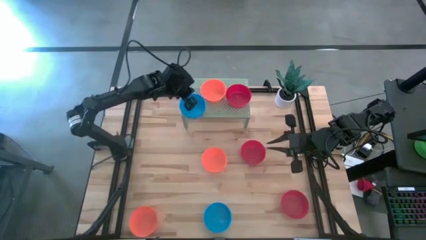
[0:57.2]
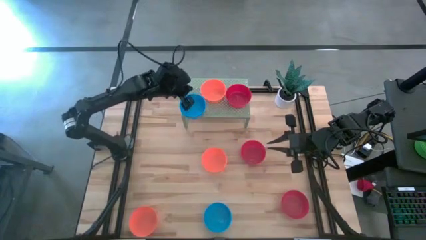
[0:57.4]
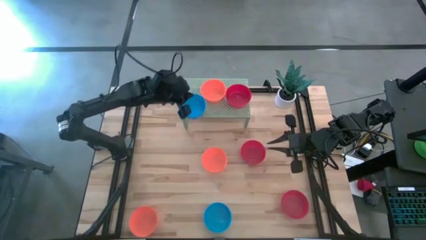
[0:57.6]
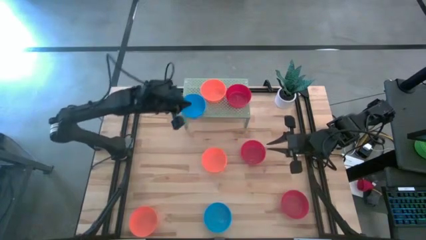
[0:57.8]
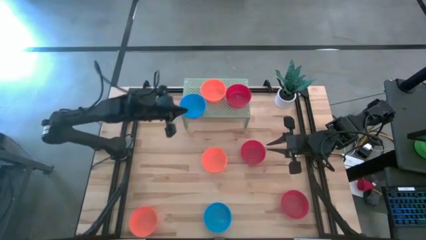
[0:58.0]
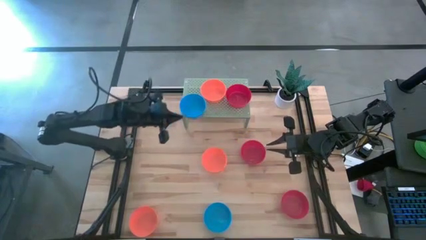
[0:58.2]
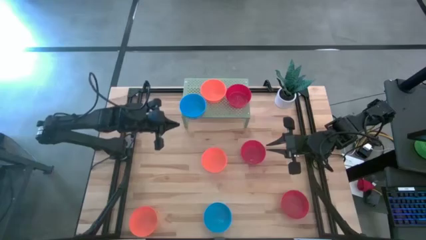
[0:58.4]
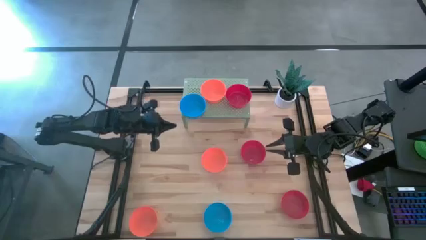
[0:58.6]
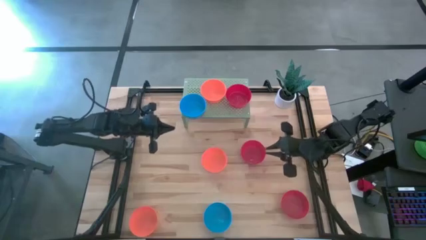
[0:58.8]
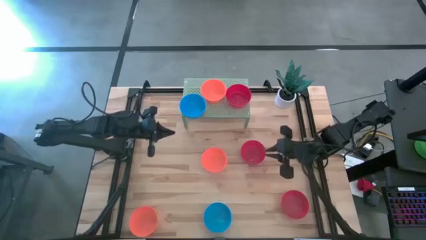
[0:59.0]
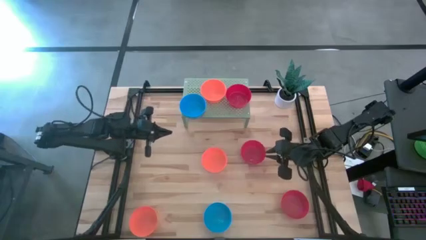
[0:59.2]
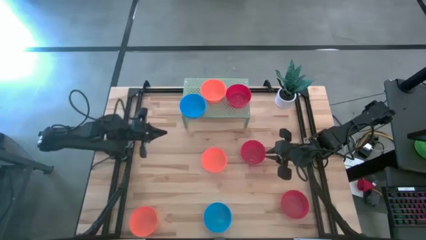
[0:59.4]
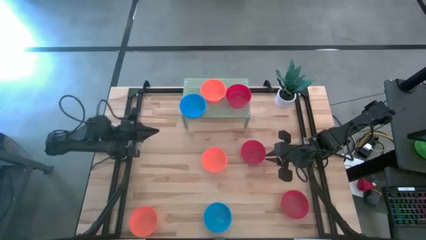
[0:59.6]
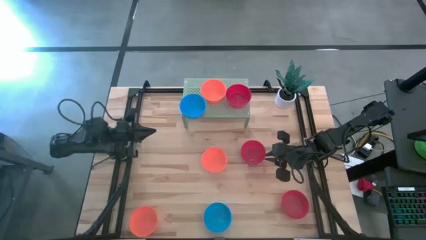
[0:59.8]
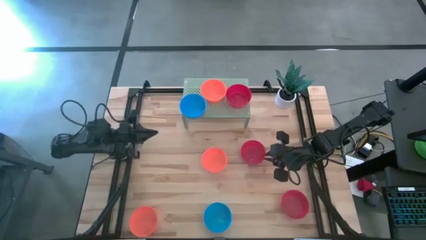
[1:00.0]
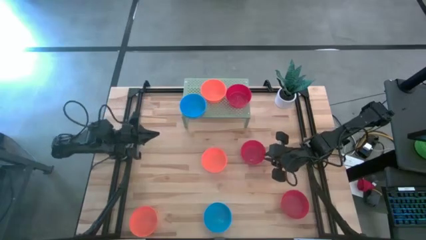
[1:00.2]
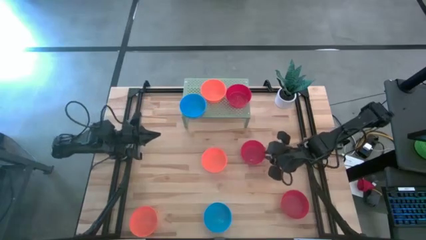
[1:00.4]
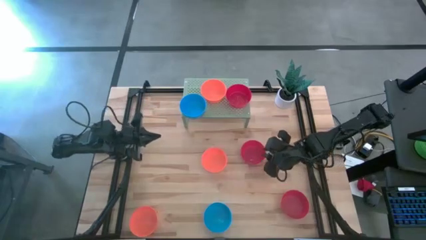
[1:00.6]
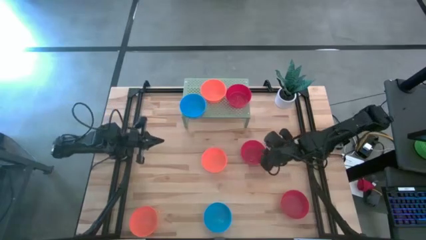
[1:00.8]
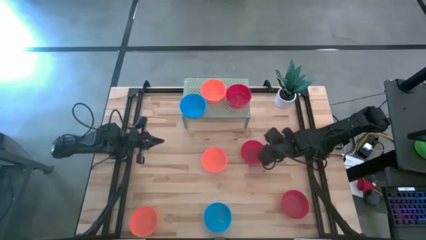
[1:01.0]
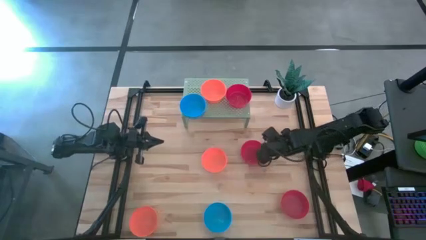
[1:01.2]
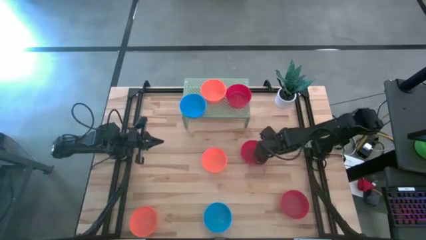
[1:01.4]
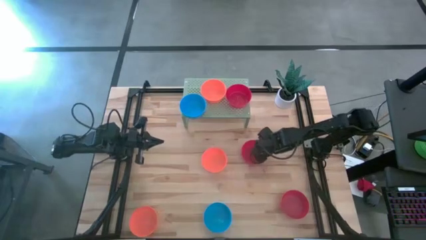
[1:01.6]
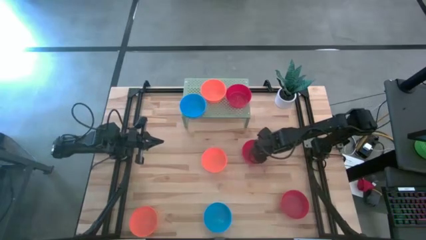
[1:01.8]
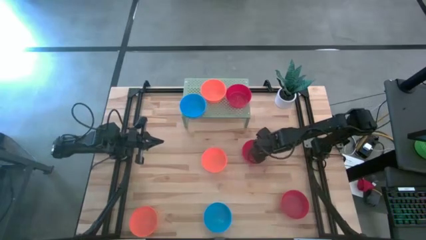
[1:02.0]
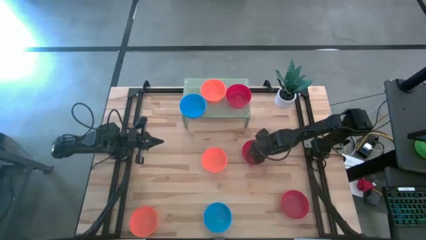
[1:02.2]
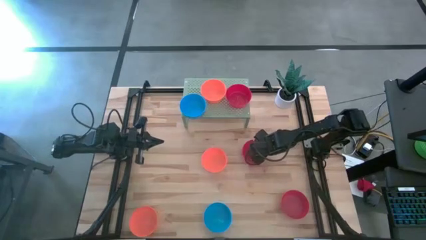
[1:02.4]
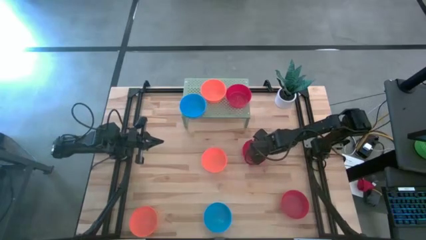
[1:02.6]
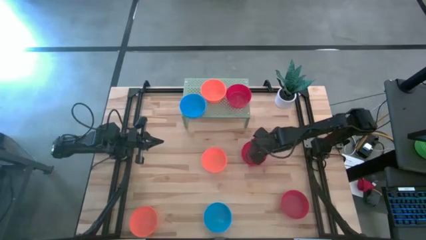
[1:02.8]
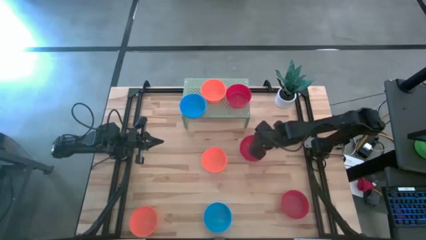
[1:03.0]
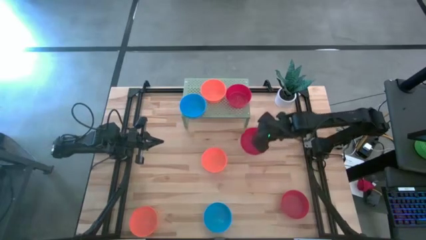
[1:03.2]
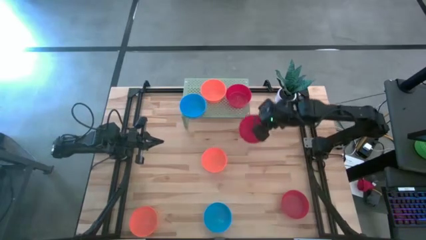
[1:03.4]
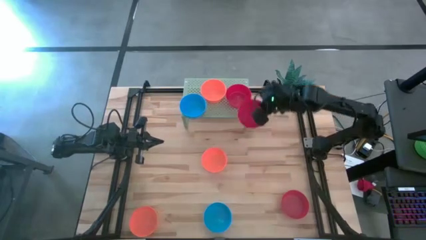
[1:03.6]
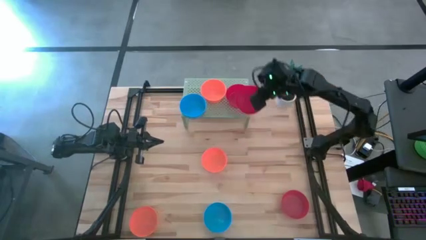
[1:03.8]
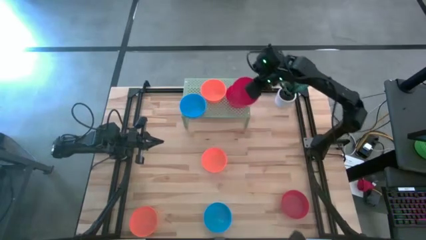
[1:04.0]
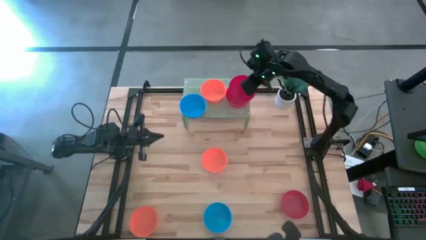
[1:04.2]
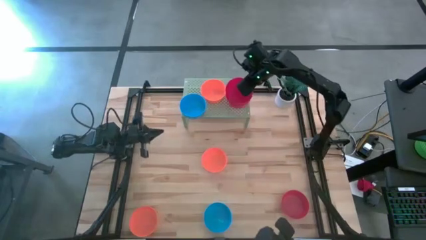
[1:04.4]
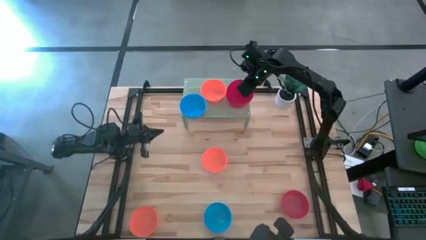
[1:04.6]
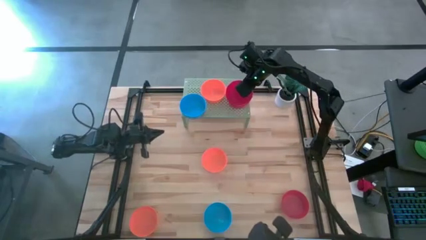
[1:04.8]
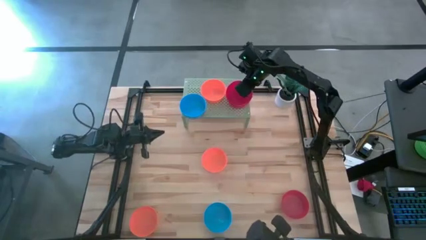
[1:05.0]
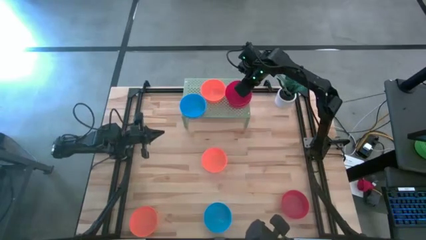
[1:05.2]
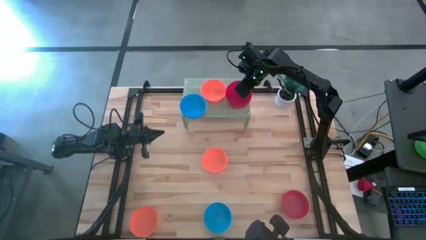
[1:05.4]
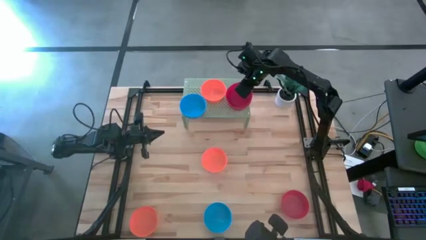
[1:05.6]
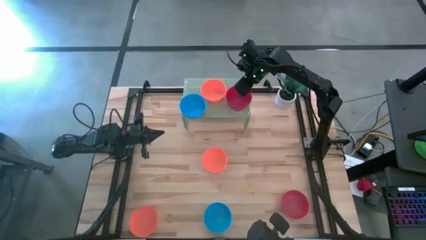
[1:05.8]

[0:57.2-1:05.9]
Task: Pick & Place Mini bowls
Stack the top red bowl on the red bowl on the shelf

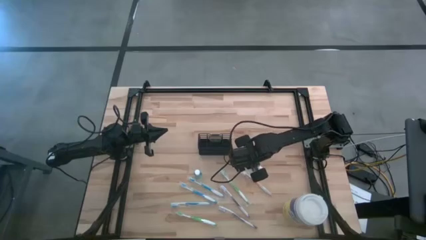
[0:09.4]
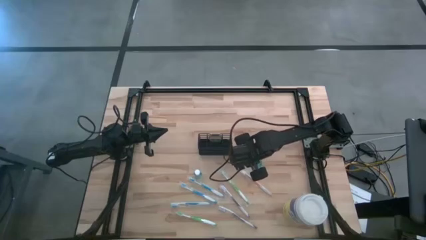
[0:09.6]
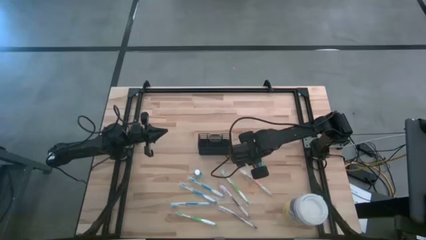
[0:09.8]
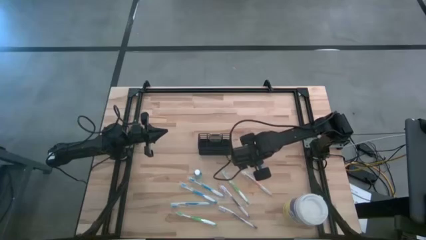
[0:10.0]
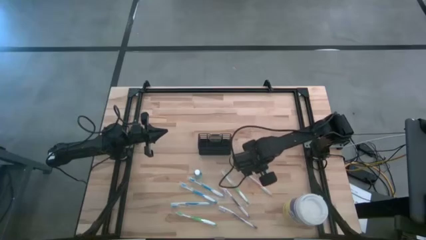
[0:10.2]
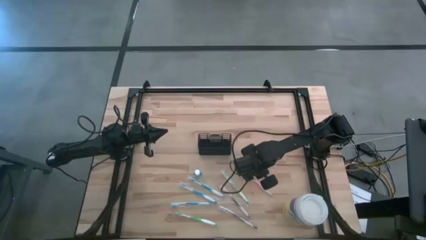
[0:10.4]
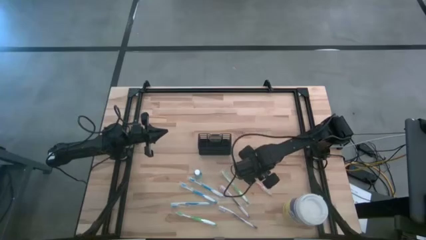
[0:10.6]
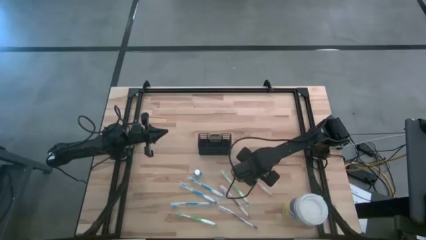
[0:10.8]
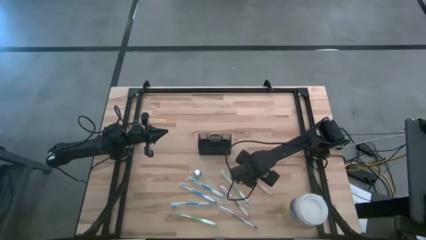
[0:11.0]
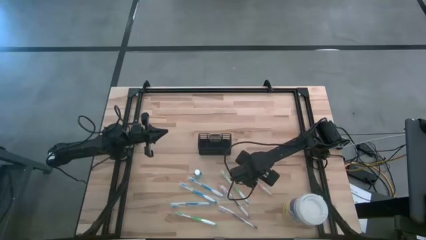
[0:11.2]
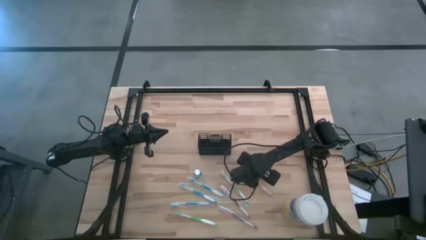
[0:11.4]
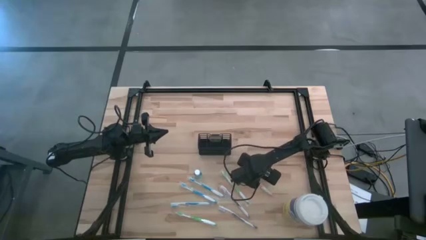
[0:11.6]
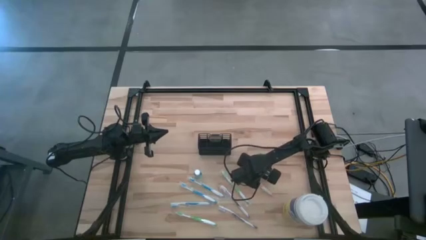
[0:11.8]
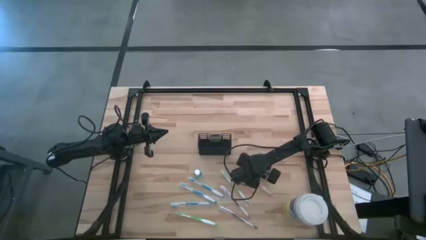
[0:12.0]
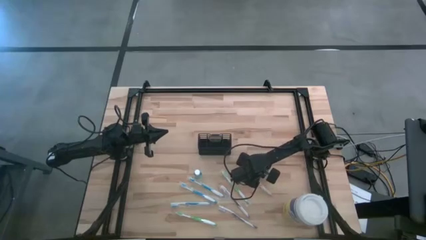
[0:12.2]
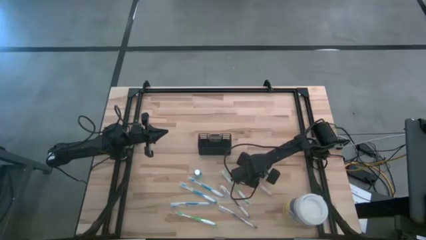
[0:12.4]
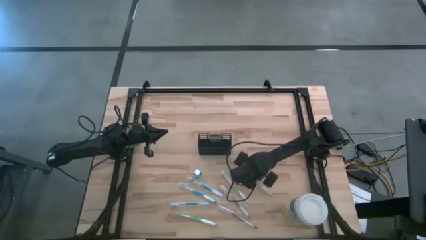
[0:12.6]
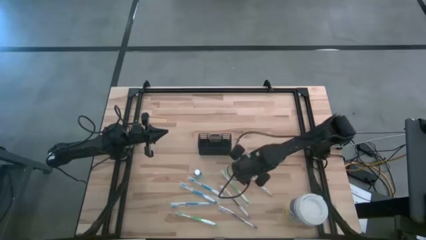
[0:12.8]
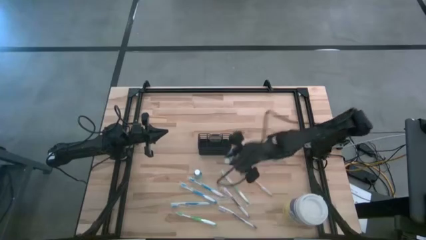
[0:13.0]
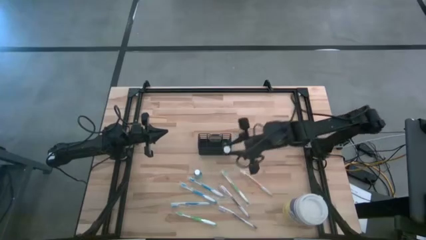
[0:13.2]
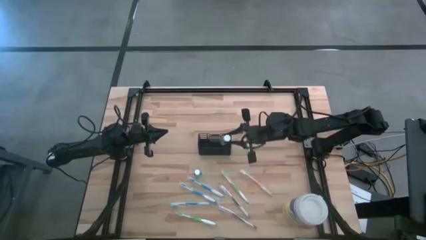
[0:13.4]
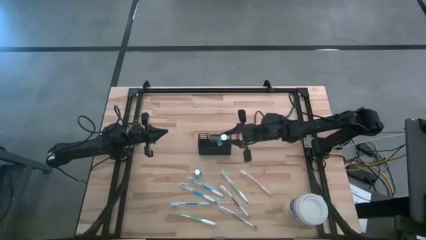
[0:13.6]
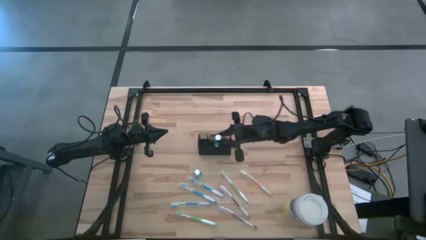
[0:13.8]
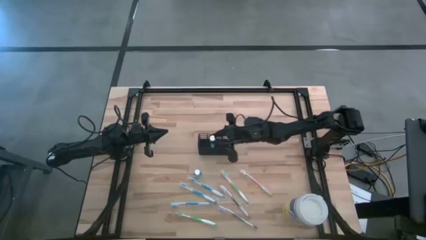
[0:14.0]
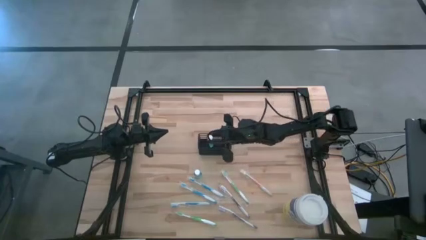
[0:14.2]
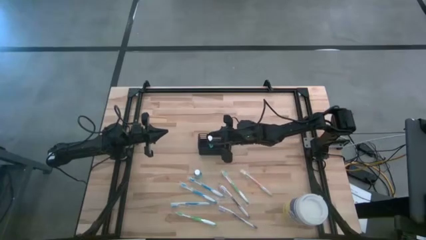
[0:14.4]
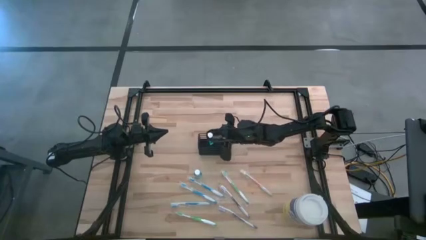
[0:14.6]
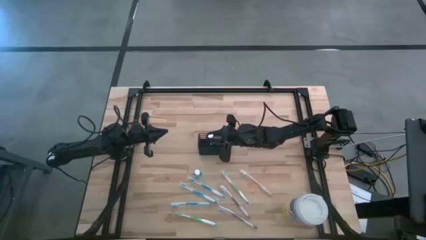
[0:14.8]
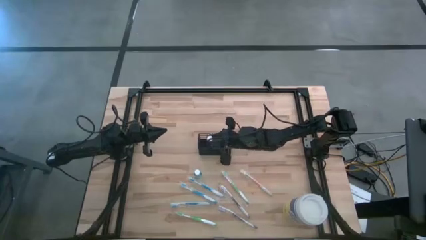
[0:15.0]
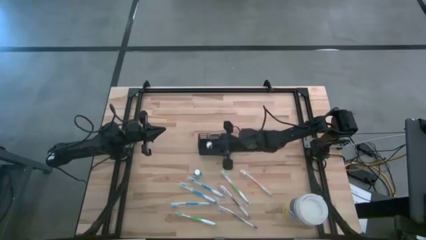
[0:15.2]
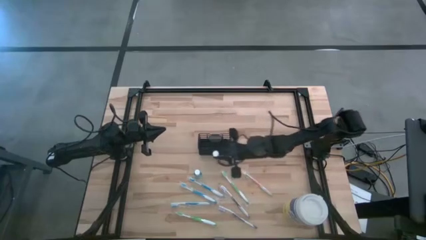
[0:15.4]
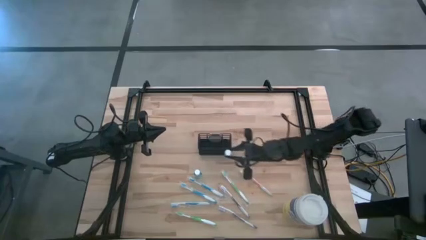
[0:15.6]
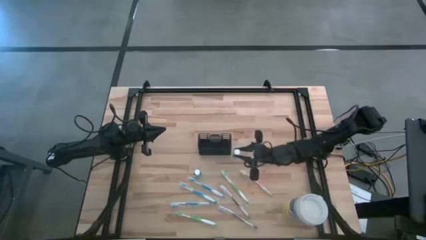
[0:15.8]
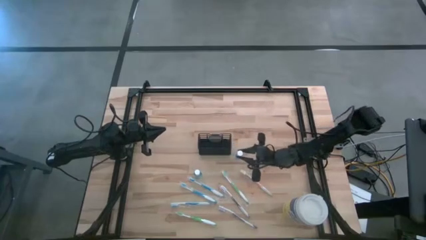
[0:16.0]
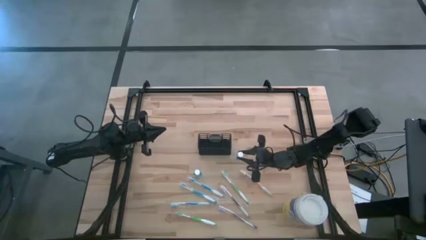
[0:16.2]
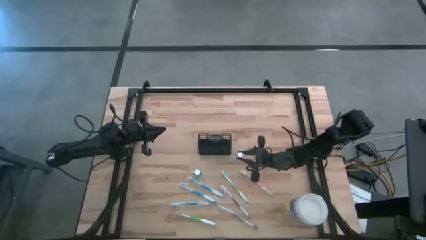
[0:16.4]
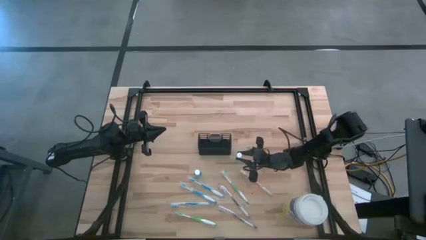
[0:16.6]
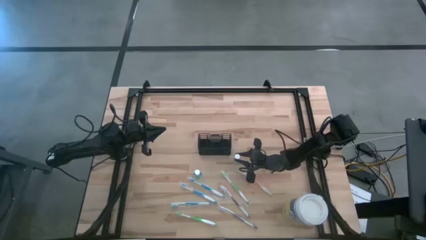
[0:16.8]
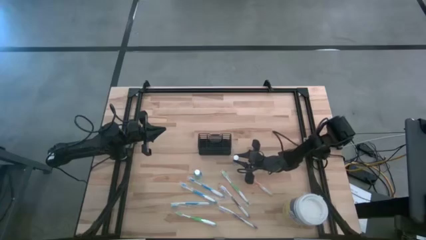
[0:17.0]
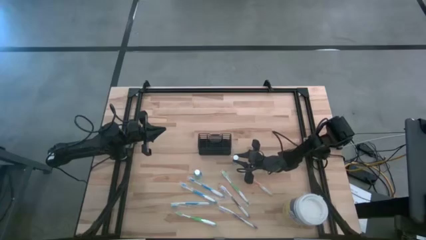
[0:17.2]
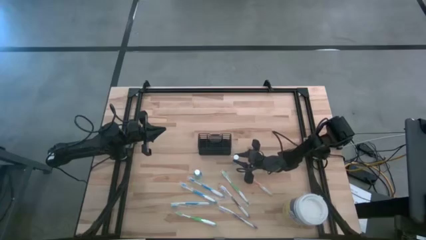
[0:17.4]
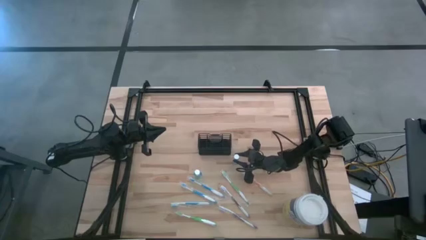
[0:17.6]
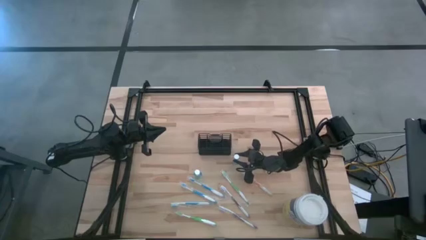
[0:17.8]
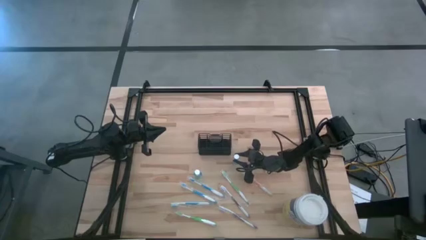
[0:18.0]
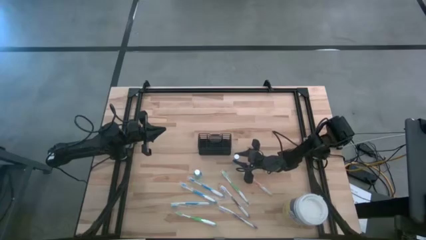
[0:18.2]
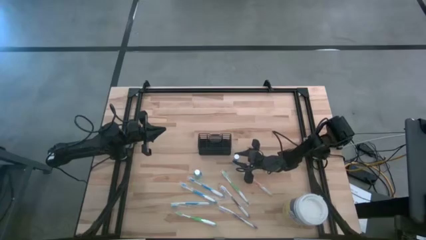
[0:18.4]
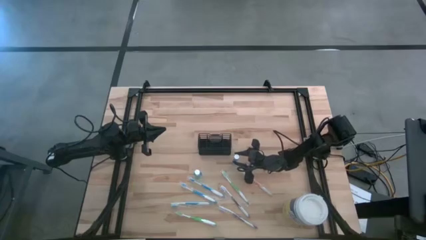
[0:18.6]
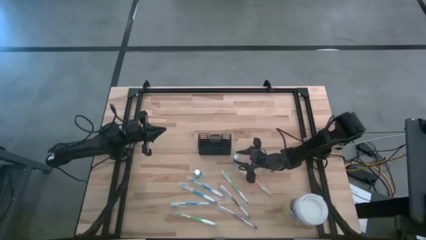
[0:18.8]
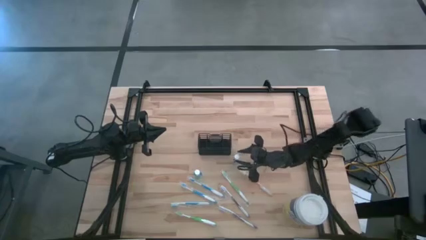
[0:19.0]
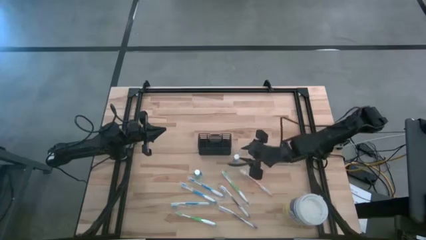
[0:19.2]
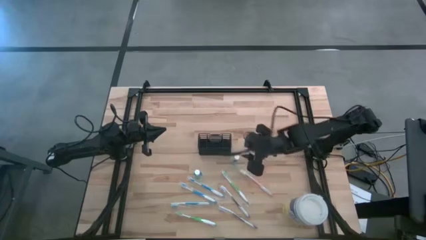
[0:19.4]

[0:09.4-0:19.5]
Task: Pick & Place toothbrushing station
Put the right blue mouthwash into the black mesh organizer
